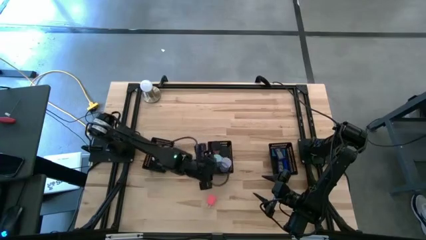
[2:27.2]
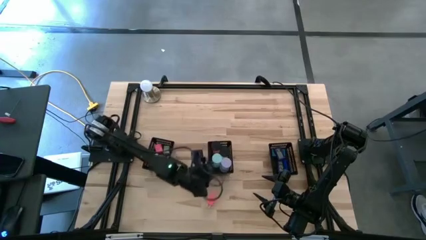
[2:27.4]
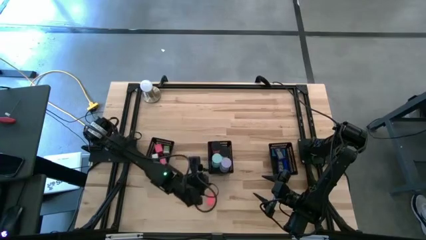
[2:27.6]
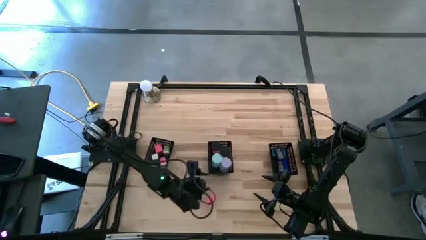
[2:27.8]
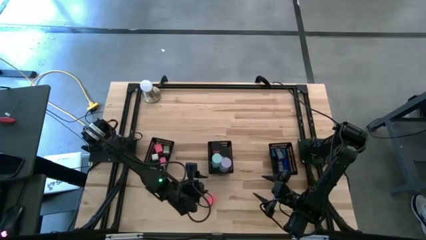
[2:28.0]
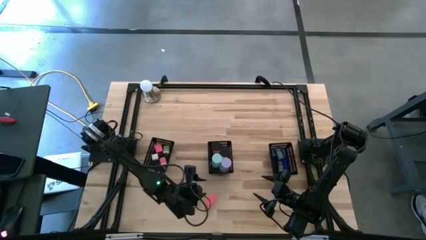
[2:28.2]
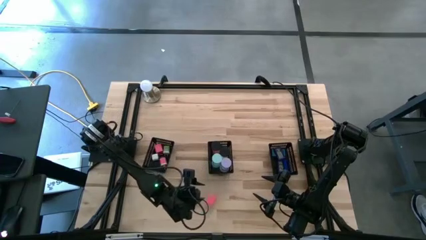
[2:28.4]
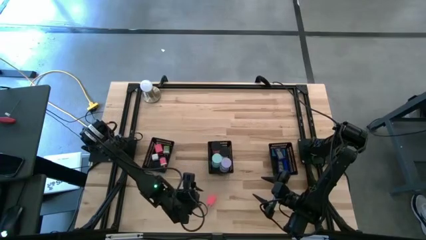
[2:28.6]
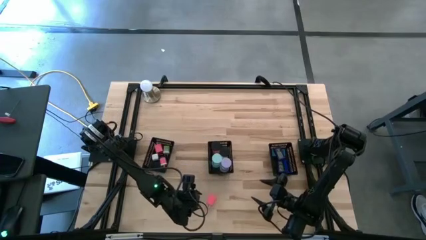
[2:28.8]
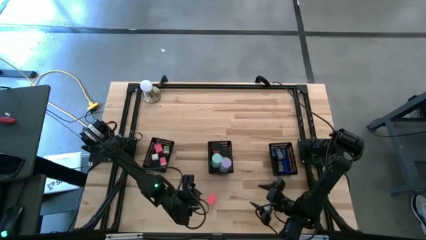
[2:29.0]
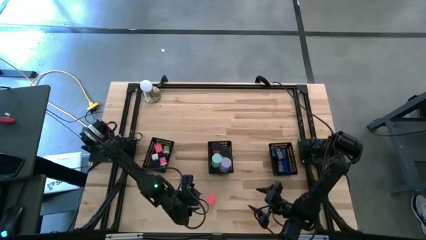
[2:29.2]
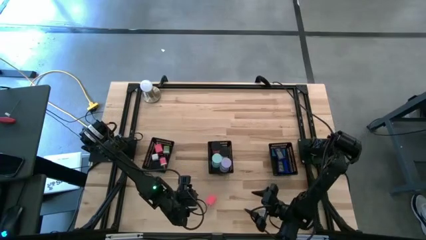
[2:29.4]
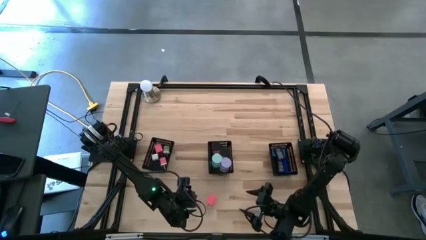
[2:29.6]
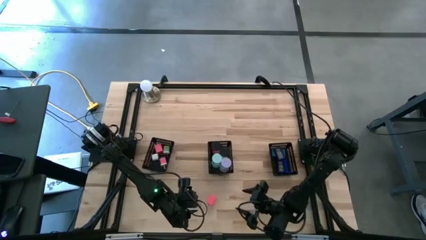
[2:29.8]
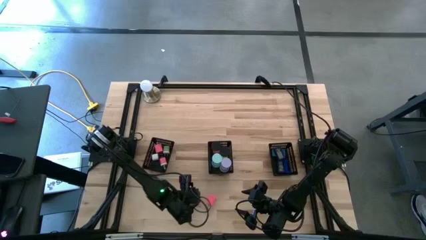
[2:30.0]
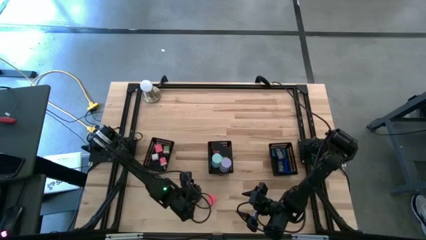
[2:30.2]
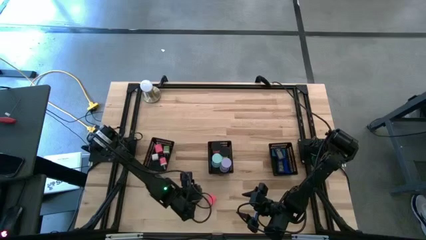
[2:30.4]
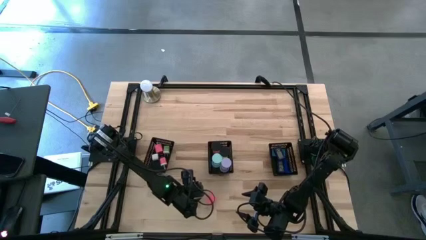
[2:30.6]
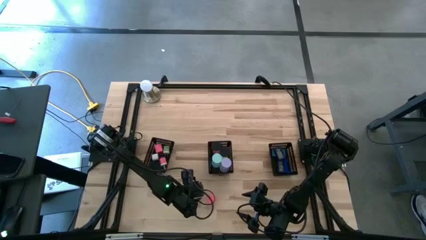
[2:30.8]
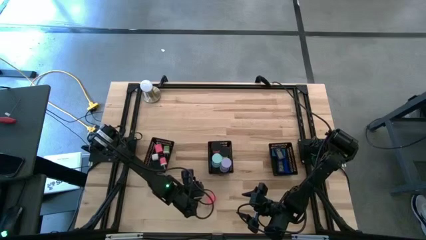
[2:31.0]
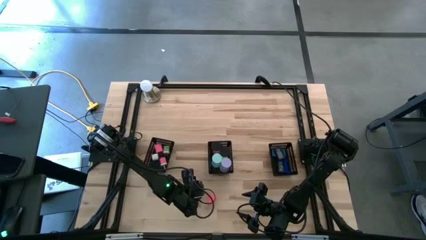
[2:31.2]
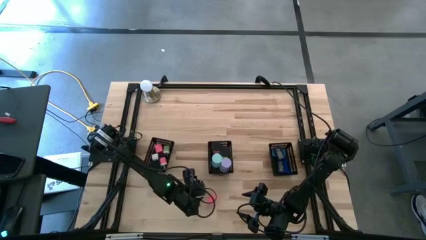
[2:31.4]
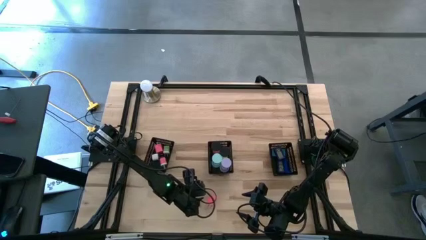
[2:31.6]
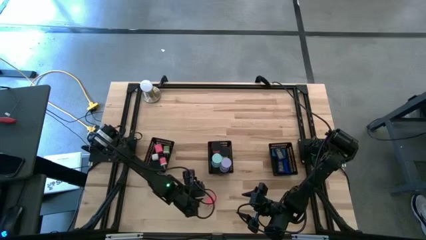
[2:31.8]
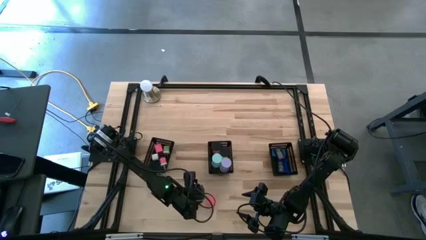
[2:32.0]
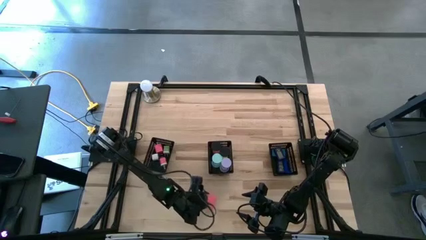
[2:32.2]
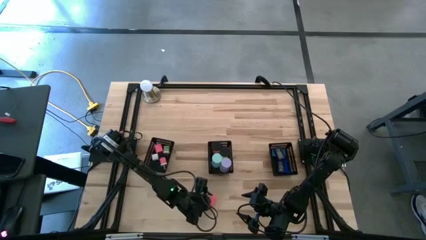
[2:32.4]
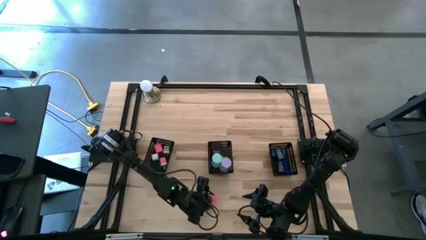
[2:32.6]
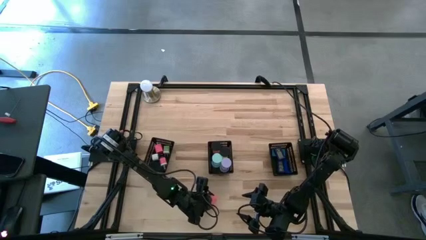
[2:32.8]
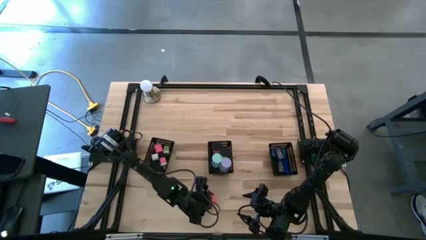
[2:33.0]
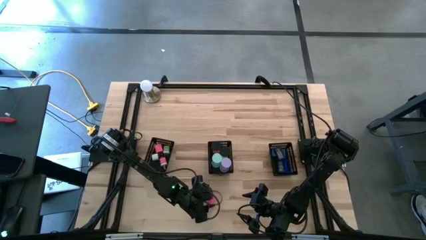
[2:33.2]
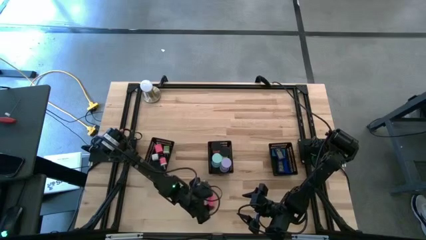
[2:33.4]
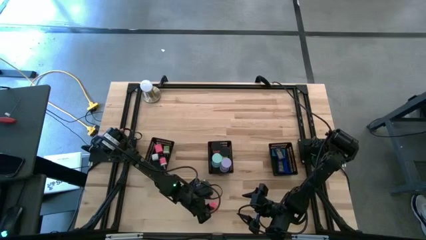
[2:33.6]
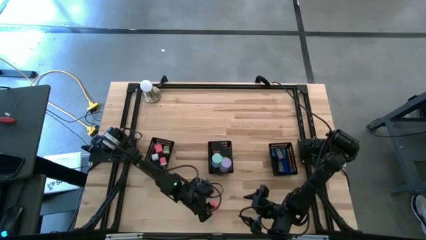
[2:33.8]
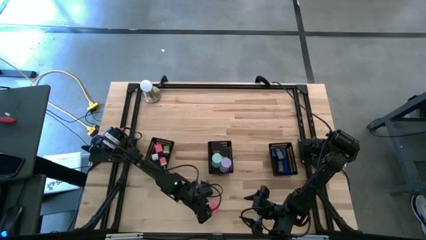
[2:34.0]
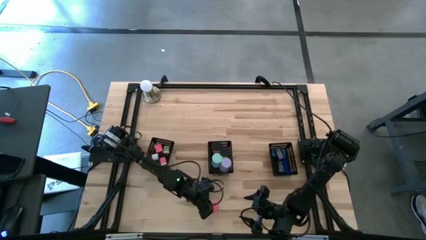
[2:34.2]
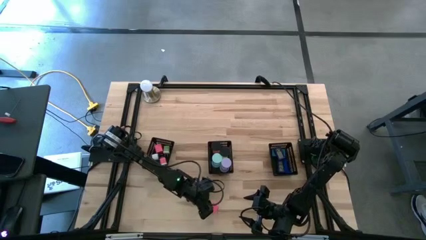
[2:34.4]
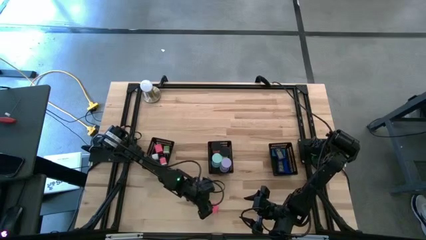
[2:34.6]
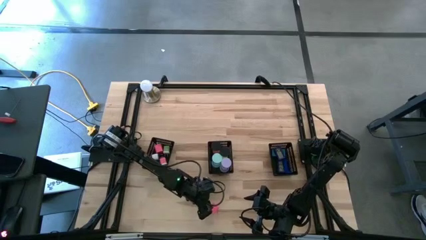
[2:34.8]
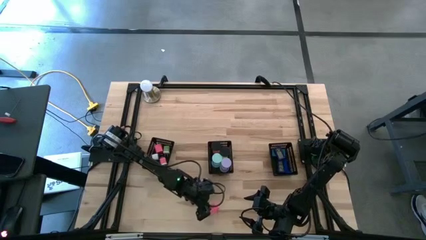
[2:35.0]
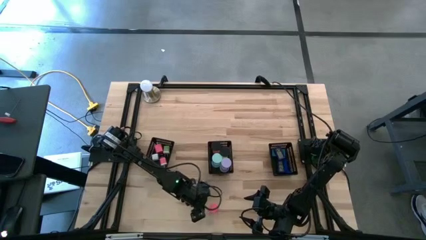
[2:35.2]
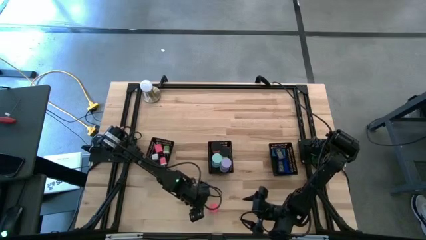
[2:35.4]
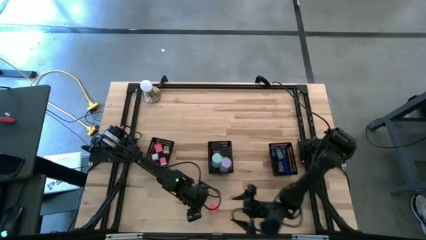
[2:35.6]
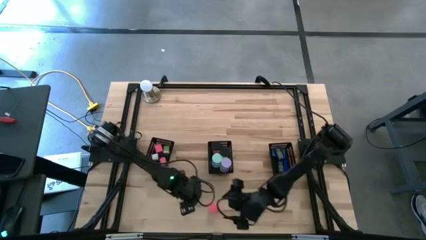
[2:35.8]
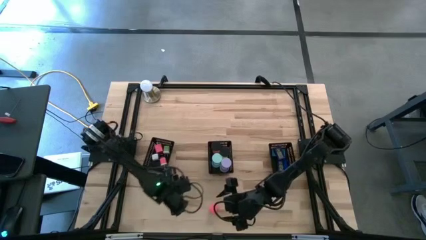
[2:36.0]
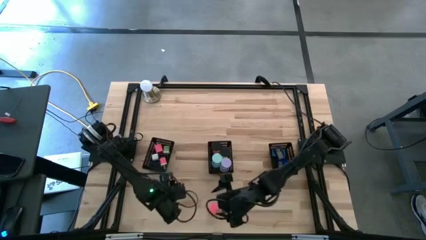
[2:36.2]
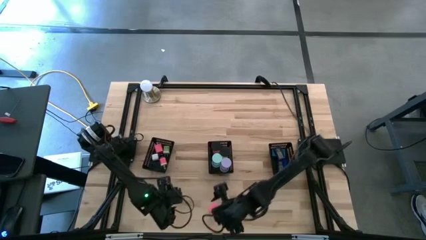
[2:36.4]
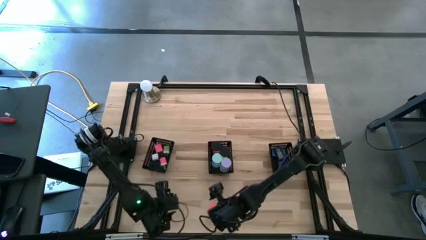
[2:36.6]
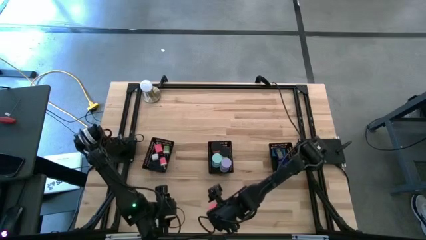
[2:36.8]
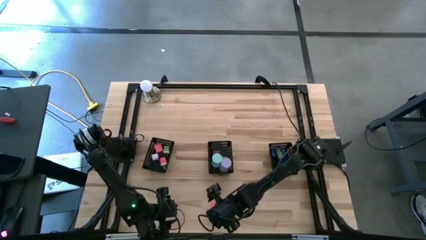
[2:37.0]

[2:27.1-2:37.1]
Task: Pick & Place Office items
Put the pink charger adapter into the left black bin

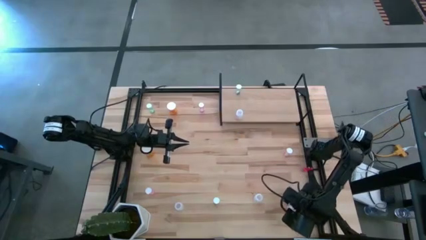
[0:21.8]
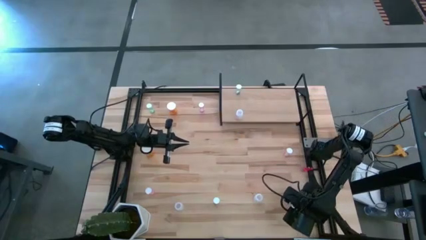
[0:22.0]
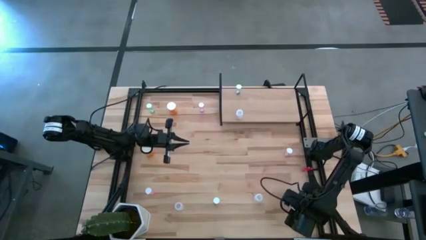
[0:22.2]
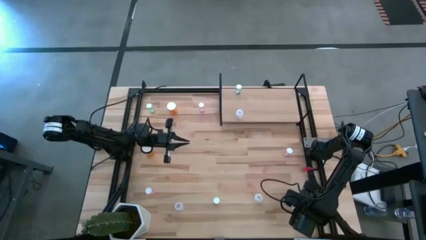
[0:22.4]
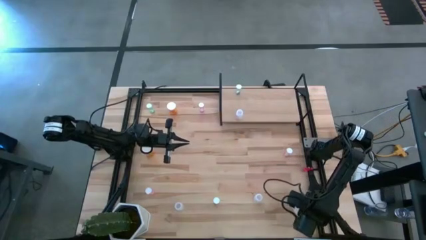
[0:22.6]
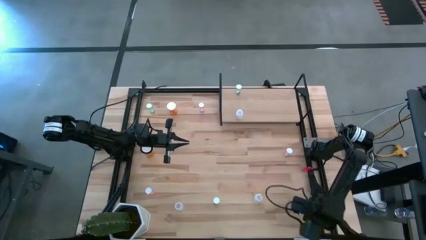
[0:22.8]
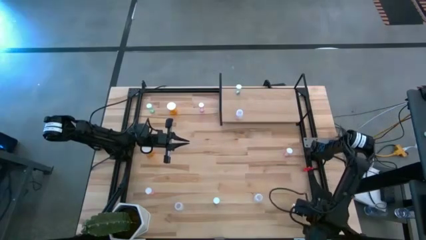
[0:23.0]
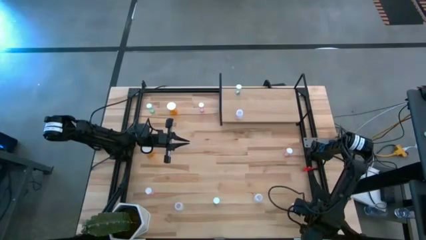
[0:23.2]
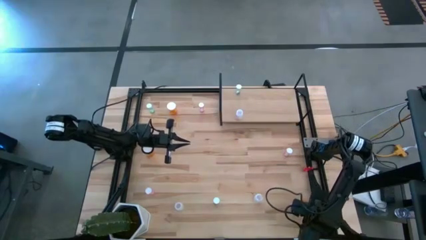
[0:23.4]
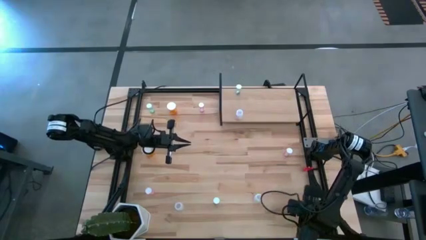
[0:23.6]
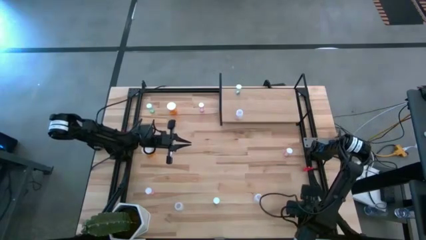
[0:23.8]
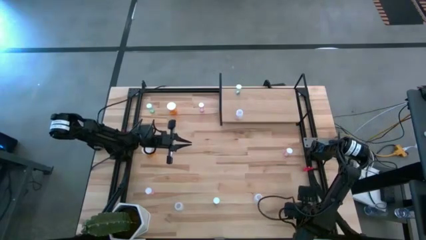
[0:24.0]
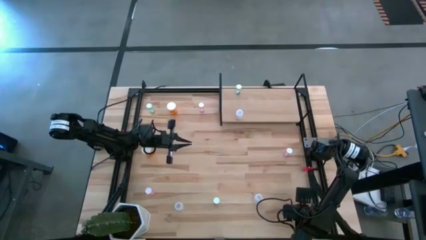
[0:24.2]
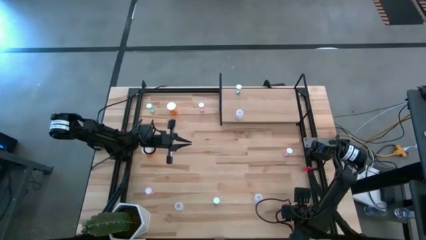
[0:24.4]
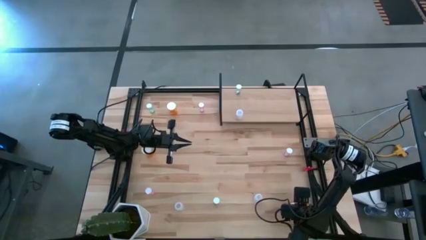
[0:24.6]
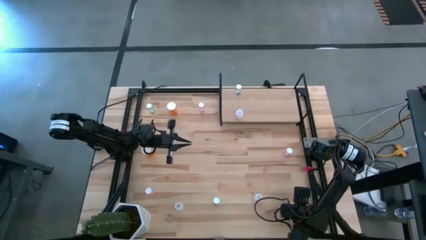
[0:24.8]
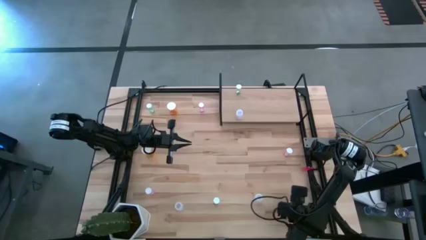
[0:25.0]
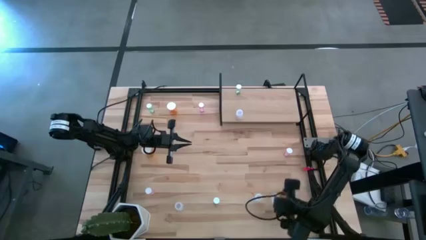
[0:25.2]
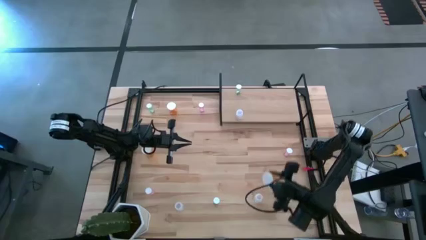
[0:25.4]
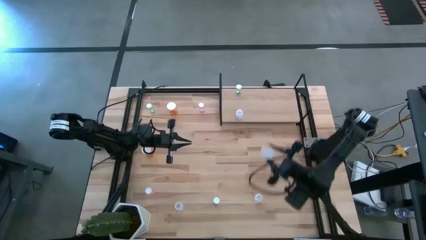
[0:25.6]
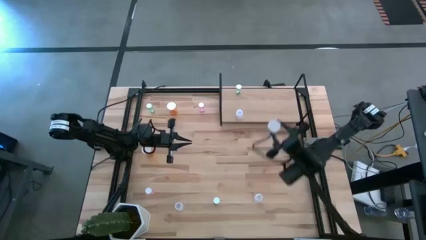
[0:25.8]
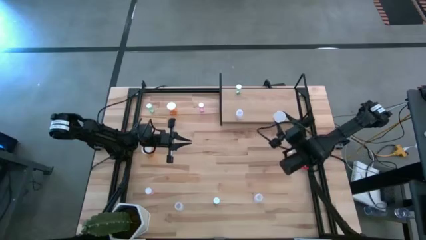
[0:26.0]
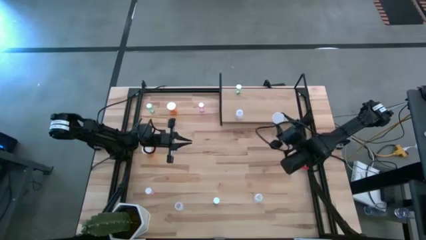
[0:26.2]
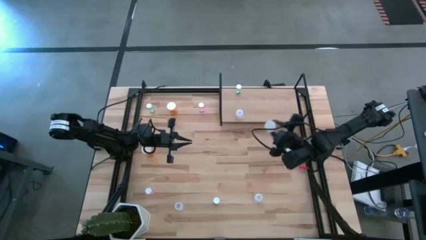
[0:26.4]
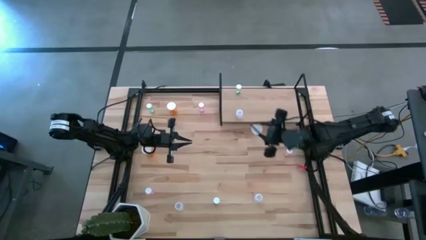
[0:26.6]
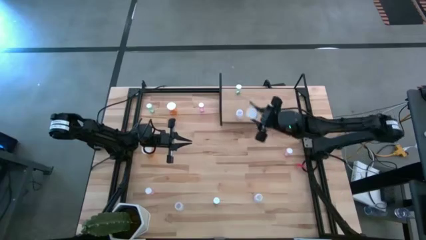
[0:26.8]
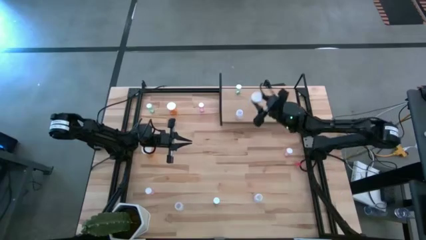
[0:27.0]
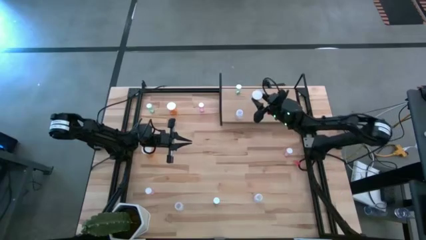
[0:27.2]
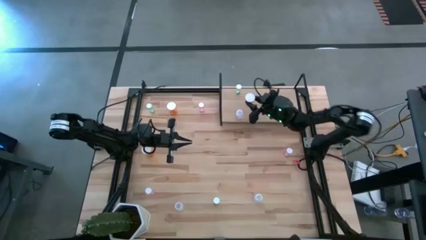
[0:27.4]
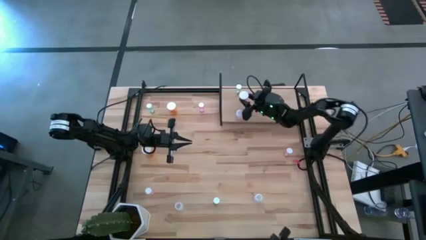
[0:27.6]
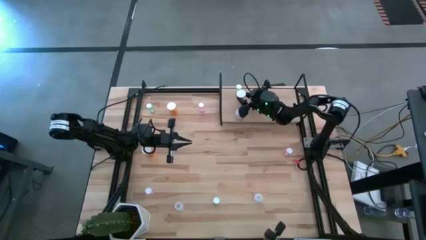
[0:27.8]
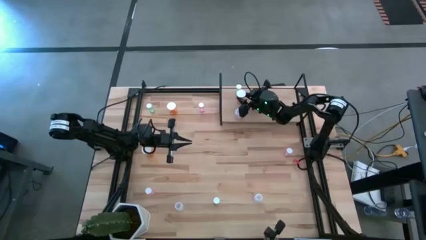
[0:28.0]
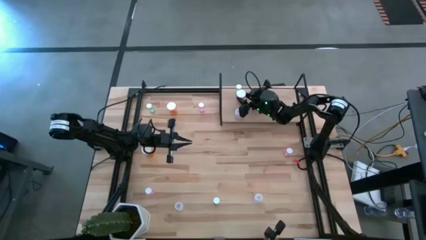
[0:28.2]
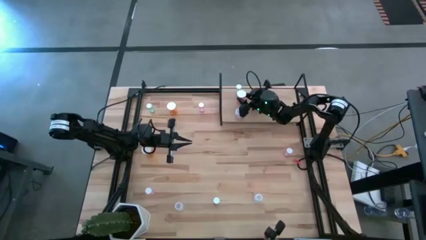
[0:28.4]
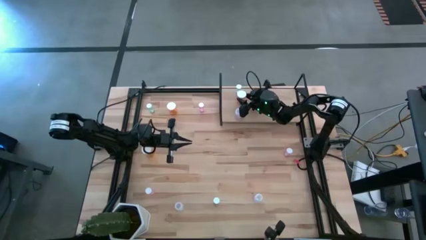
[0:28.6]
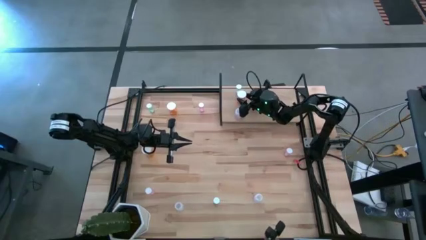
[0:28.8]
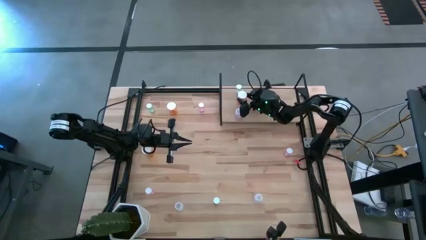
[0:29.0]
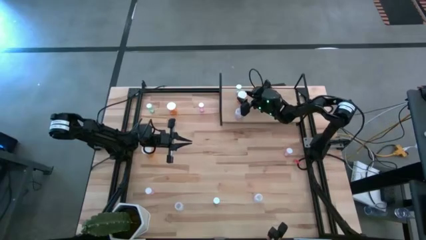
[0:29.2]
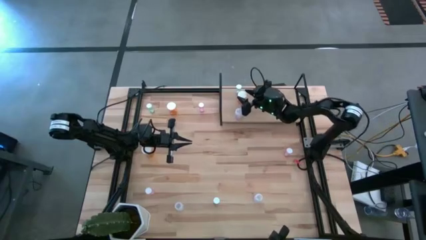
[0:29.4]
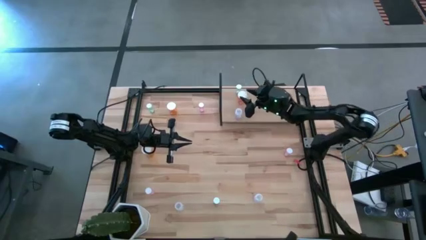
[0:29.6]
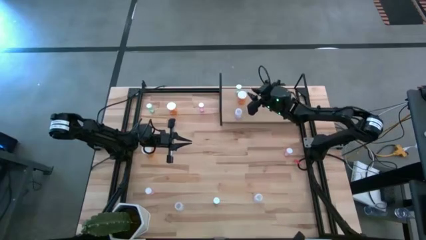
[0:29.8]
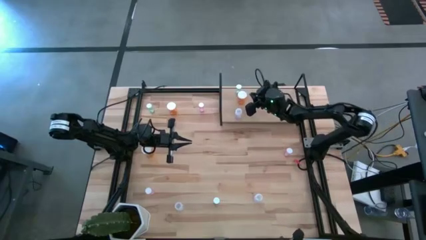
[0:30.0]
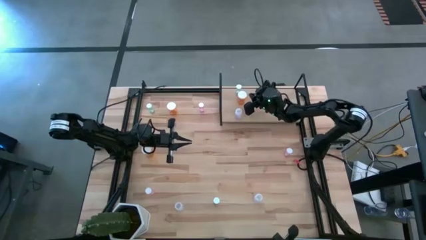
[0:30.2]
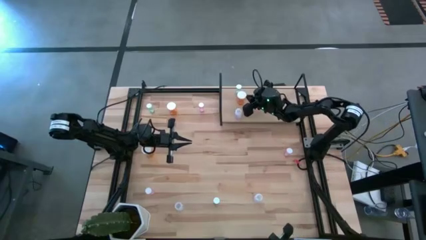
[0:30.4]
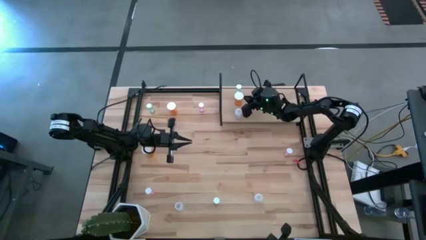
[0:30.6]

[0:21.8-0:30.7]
Task: Pick and place medicine bottles onto shelf by color
Put the bottom orange pill bottle on the shelf
